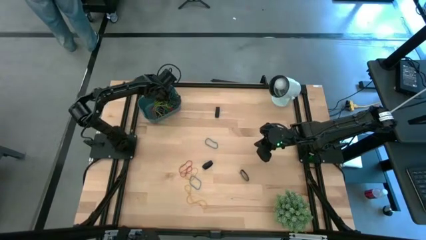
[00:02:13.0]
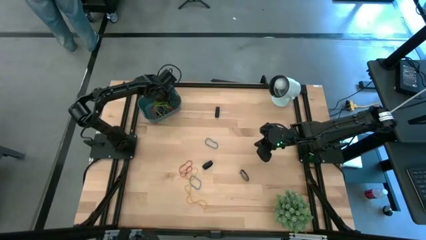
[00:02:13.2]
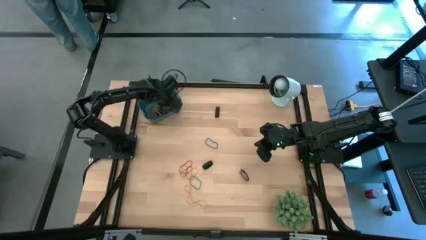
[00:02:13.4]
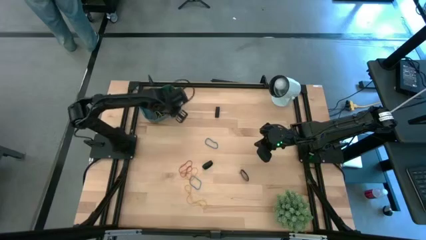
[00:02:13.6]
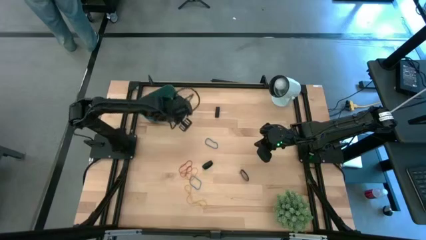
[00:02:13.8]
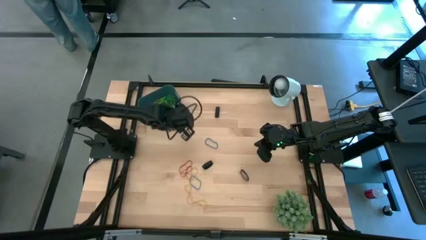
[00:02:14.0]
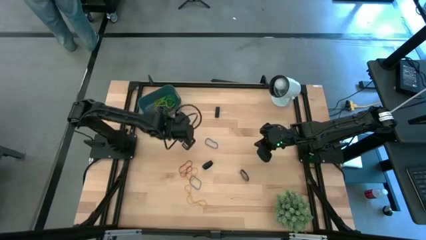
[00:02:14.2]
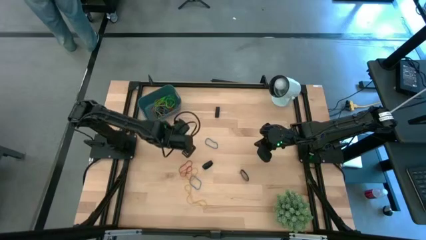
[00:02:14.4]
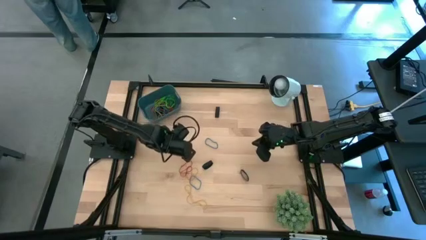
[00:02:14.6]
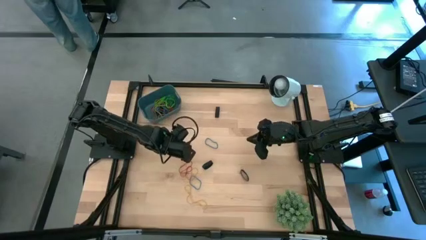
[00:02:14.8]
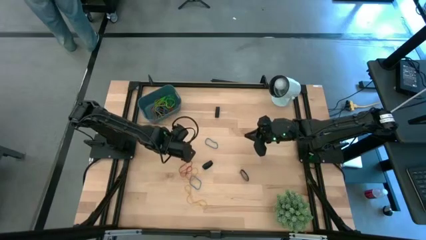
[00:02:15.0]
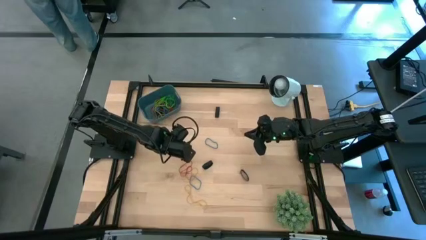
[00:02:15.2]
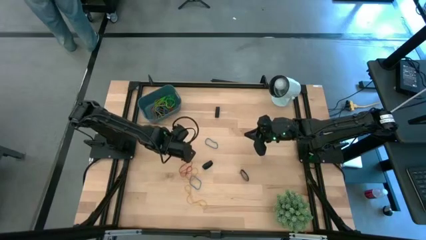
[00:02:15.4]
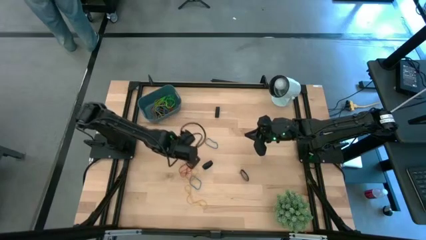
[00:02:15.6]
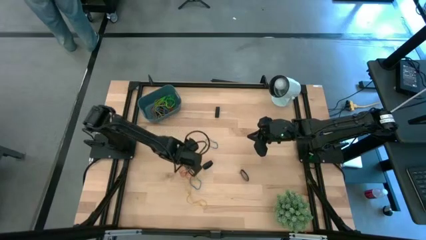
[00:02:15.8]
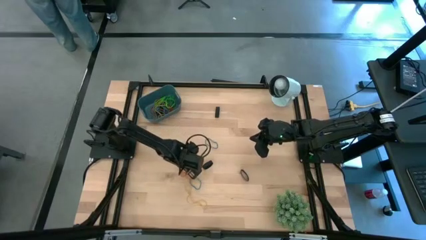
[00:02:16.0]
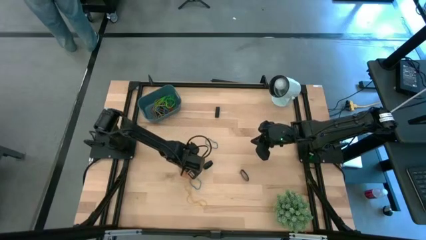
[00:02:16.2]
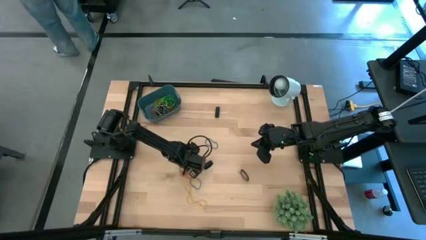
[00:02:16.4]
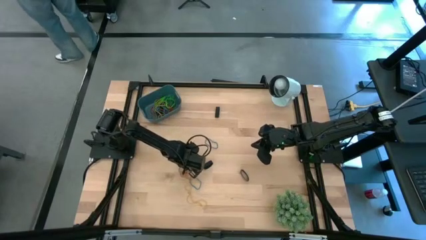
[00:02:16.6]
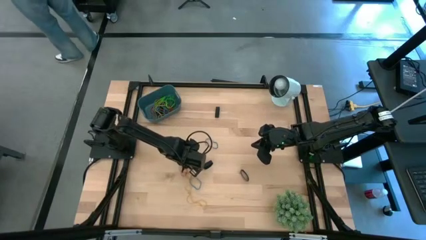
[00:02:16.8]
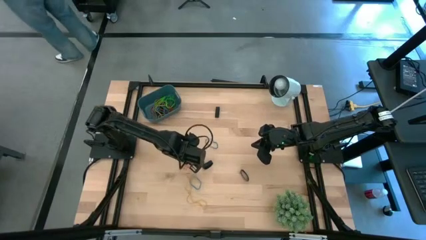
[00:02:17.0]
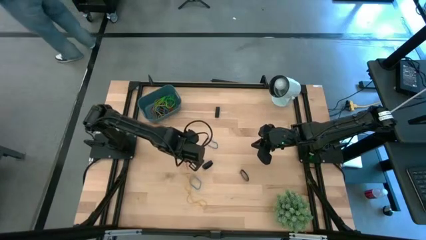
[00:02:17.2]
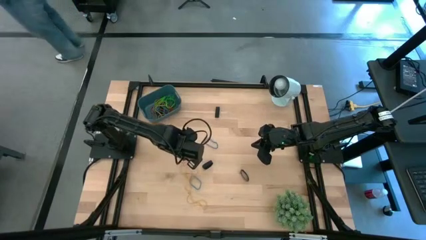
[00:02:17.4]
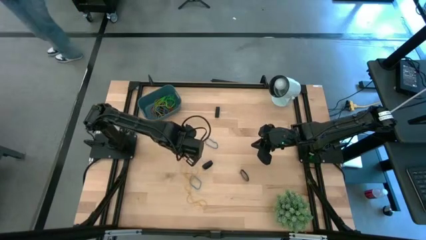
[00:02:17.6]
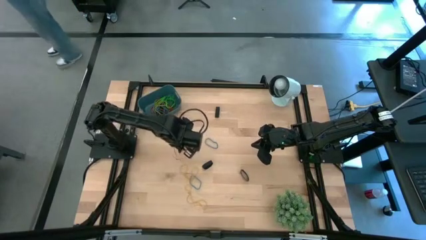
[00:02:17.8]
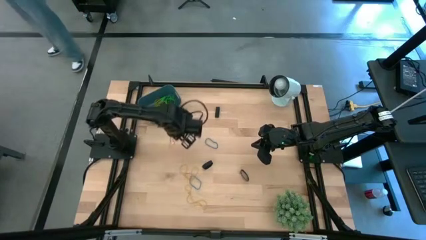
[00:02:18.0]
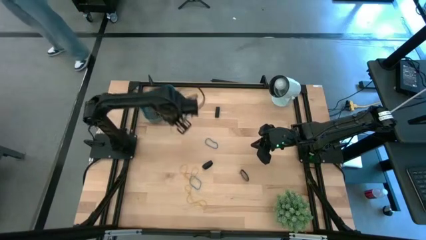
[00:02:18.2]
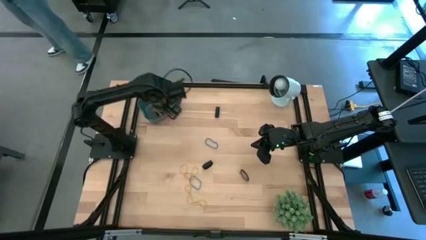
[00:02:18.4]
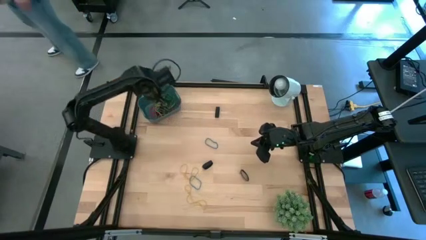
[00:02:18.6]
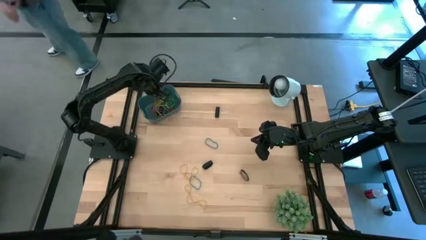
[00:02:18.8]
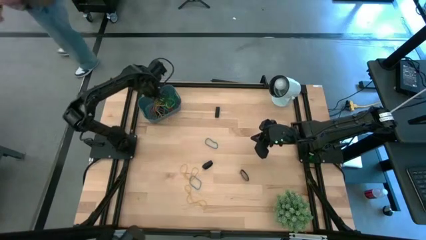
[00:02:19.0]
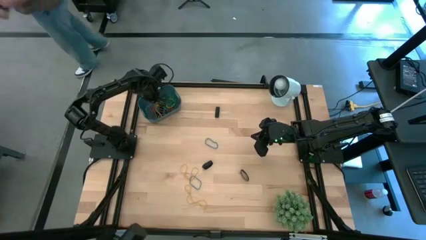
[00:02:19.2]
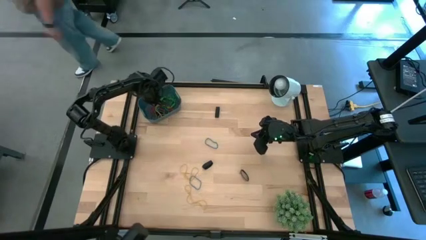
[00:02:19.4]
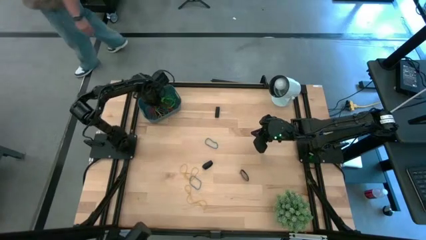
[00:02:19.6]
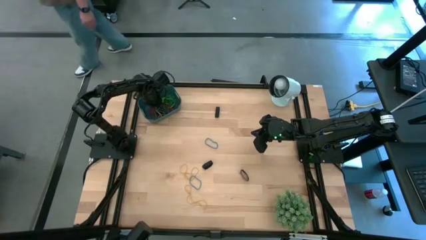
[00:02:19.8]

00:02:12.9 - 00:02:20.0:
Task: Pick and place rubber bands into bin
Put the red rubber band into the bin

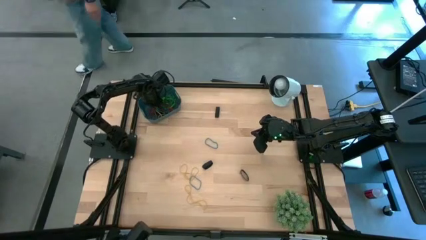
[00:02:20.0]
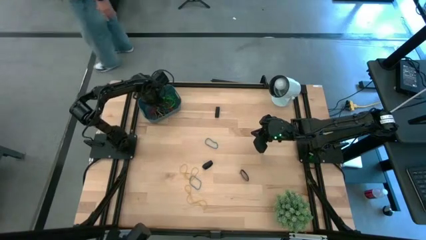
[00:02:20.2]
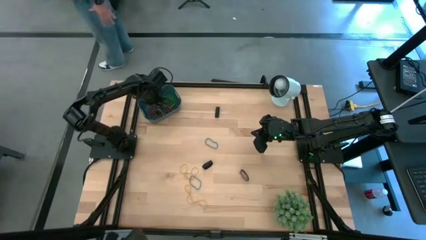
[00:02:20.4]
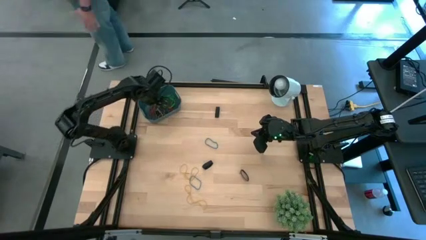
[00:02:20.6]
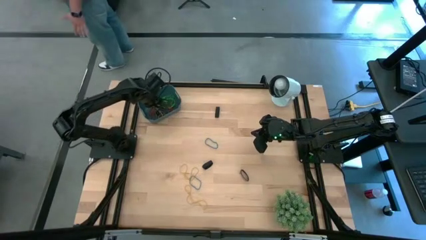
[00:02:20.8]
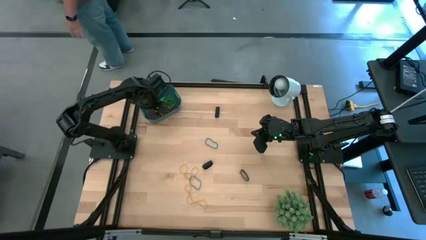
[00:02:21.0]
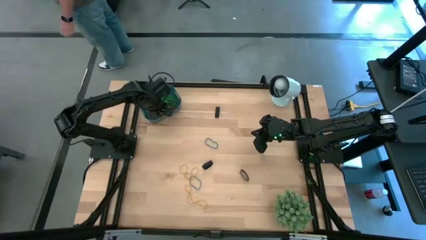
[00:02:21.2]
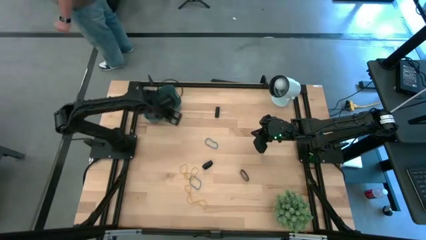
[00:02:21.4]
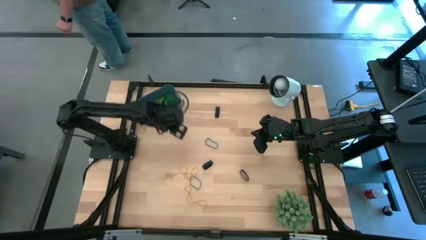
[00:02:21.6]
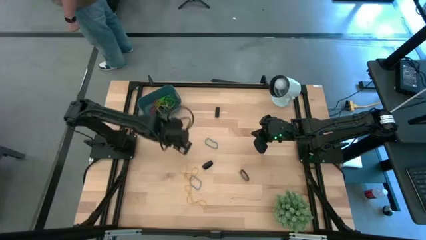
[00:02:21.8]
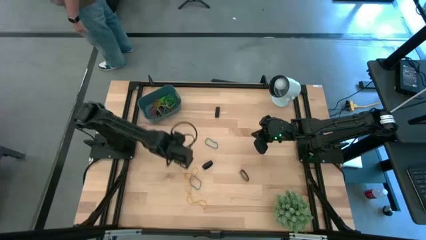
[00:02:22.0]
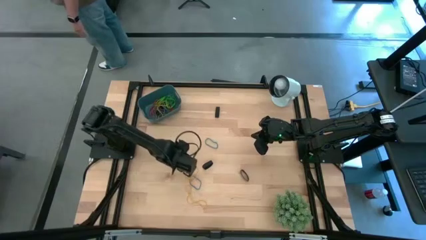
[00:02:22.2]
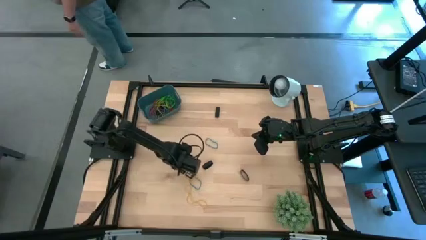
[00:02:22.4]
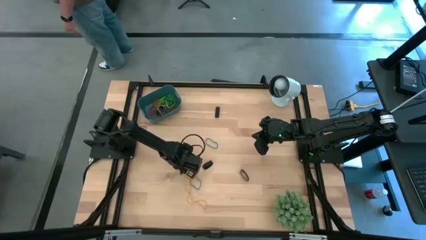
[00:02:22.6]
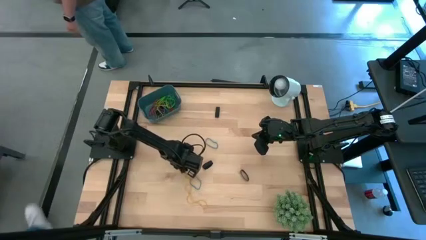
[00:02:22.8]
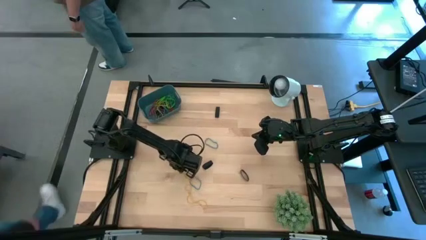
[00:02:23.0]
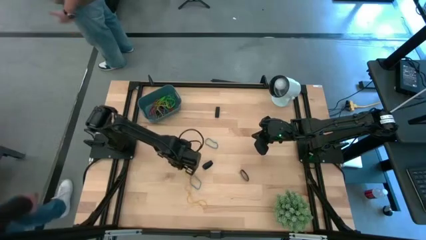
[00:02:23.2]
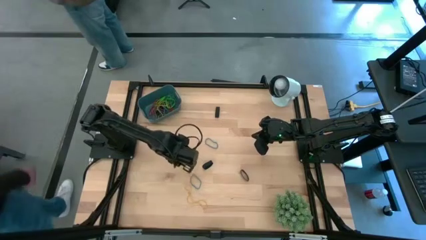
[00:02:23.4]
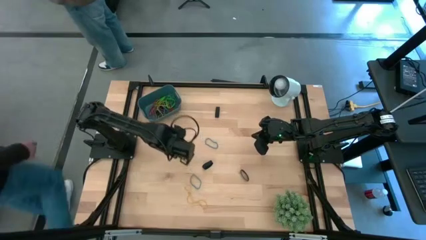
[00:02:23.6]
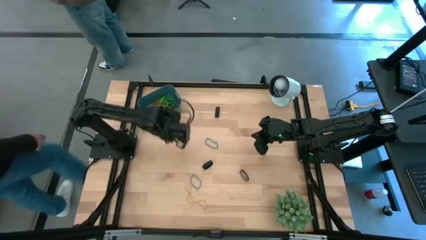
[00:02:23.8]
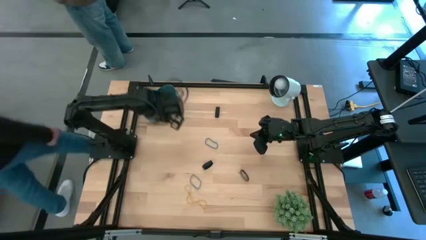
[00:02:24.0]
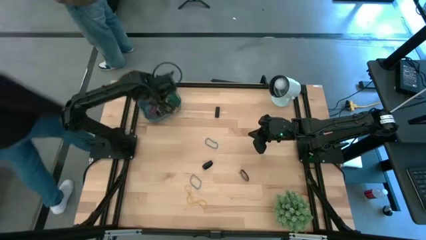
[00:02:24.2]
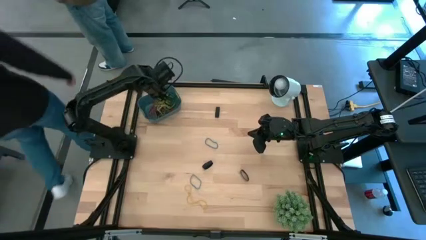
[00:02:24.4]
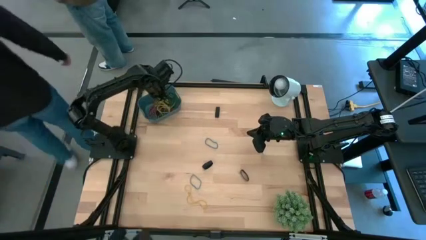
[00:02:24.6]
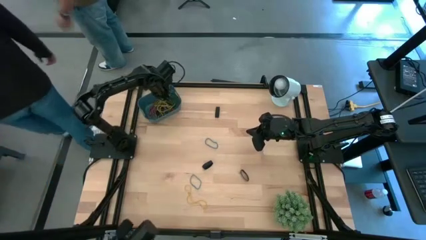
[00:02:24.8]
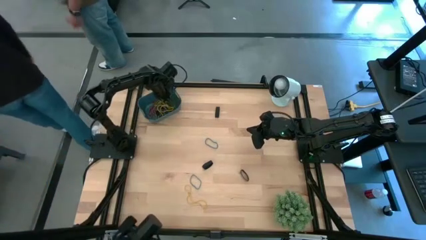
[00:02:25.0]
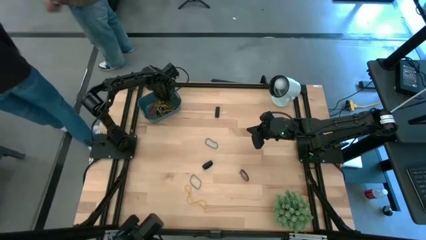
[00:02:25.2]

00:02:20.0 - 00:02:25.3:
Put the top yellow rubber band into the bin

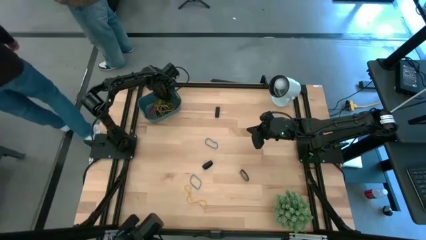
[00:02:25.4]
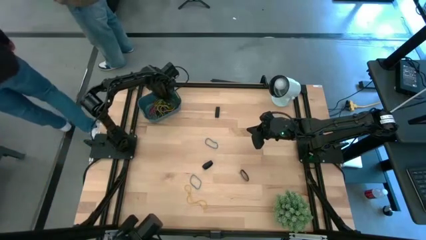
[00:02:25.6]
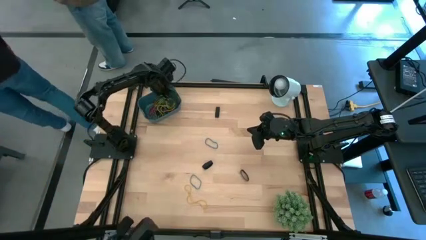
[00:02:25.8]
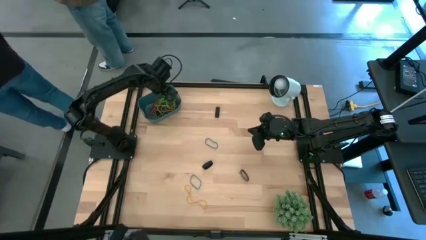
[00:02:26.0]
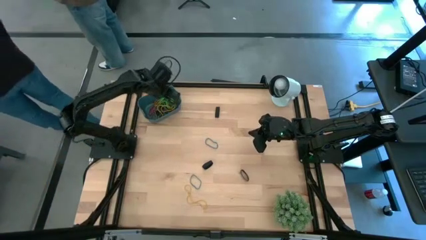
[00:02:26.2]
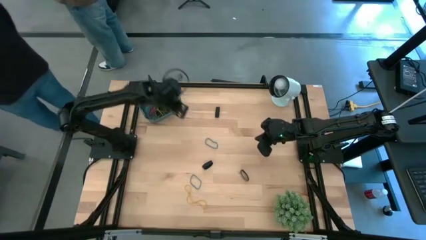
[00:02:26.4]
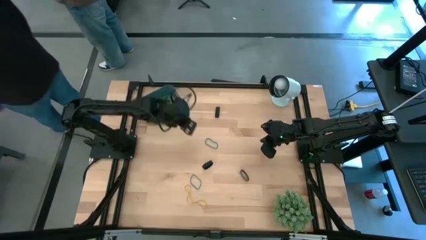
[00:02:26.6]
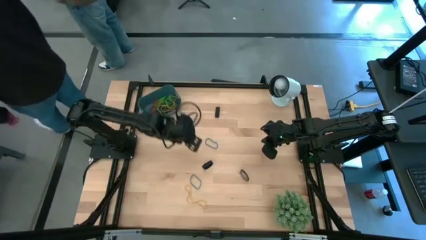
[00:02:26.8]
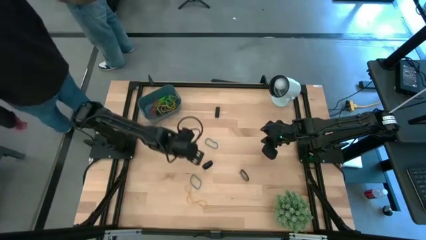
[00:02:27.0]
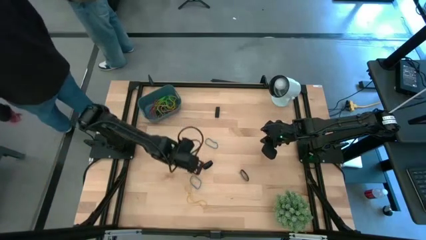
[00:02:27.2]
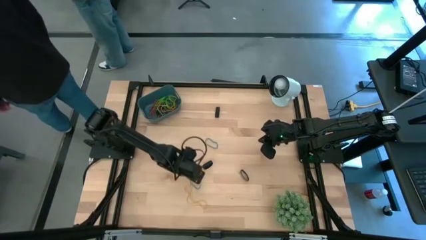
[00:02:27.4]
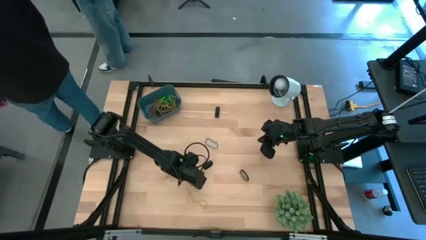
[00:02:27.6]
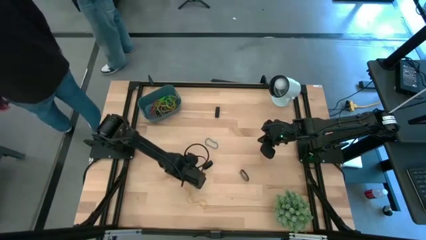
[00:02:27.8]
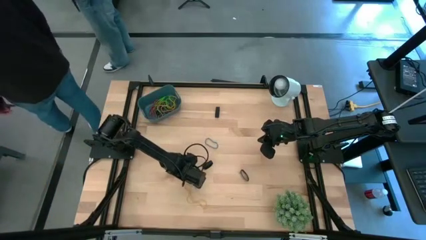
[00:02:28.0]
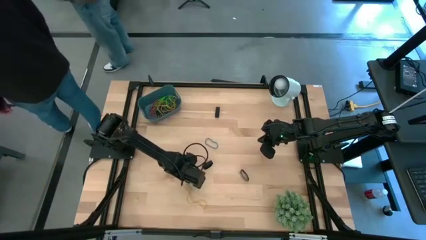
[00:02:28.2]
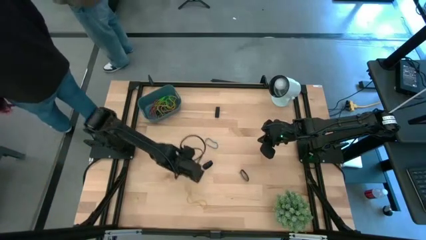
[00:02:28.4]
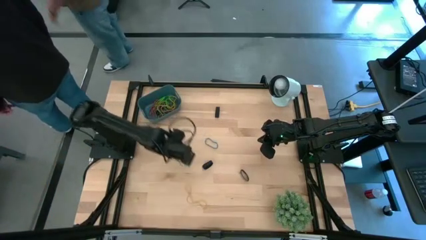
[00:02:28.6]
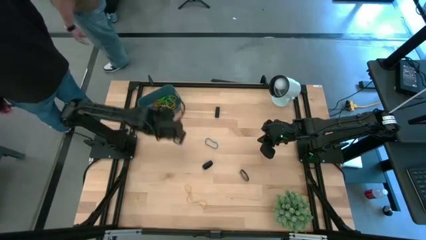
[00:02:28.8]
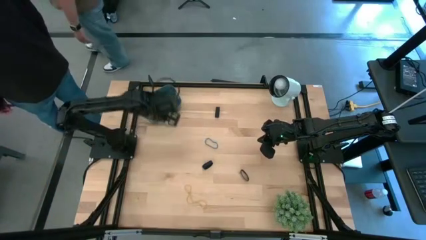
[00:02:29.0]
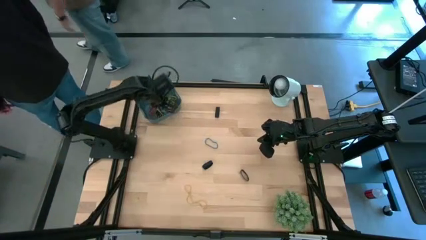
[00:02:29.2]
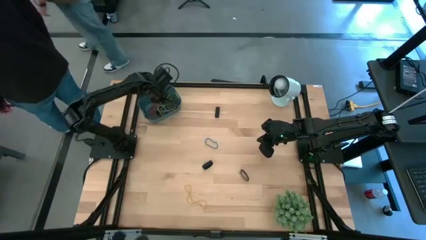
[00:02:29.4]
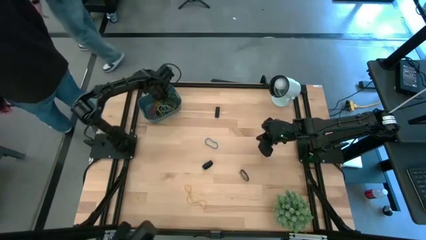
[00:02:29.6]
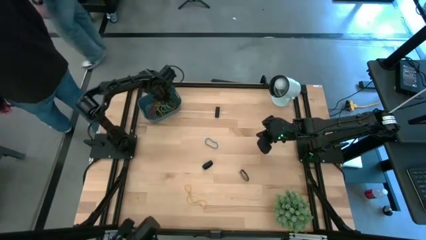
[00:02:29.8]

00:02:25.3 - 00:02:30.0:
Put the bottom blue rubber band into the bin
